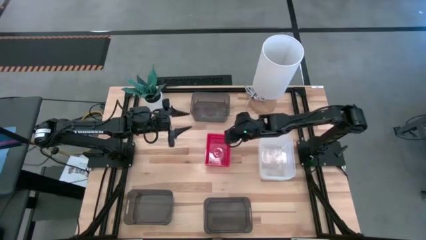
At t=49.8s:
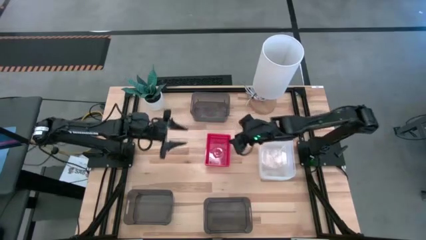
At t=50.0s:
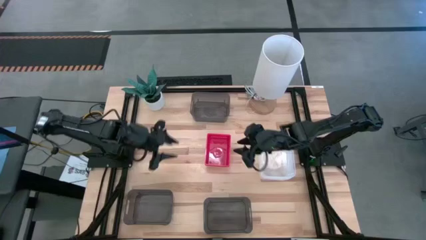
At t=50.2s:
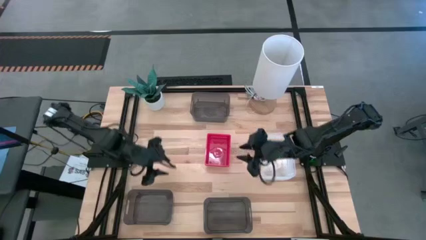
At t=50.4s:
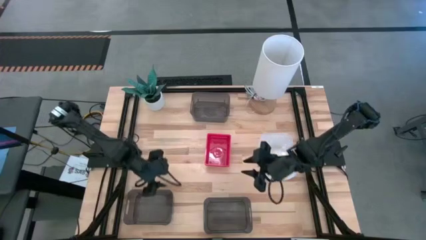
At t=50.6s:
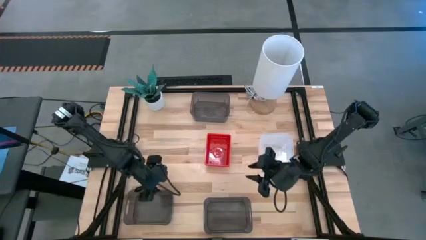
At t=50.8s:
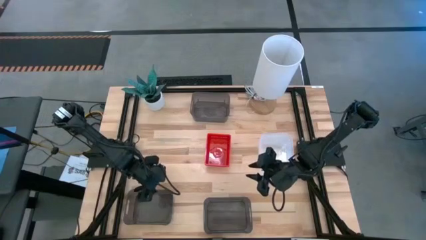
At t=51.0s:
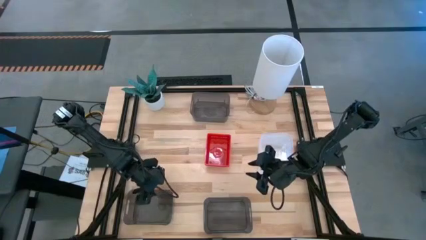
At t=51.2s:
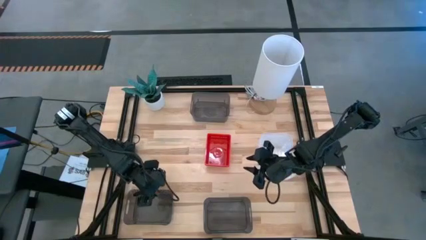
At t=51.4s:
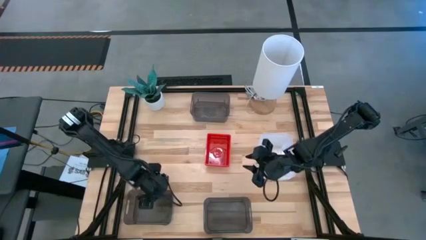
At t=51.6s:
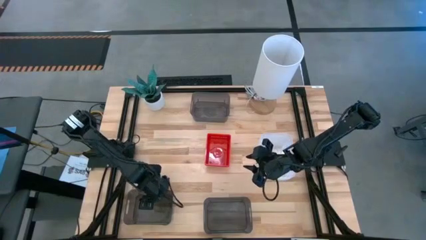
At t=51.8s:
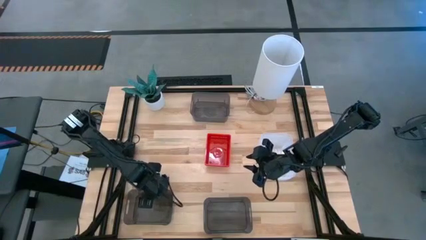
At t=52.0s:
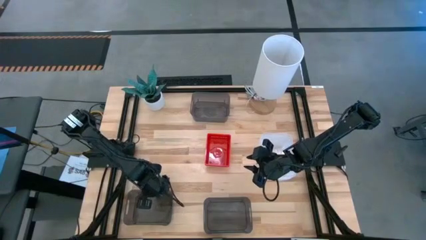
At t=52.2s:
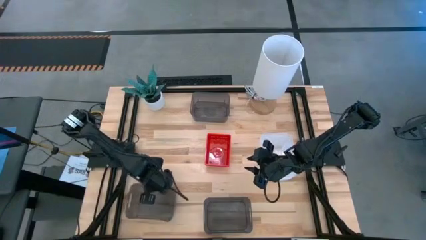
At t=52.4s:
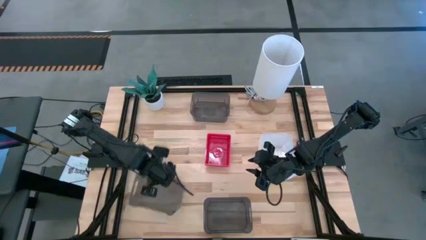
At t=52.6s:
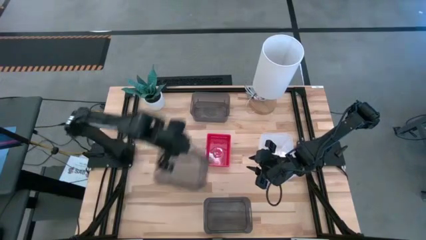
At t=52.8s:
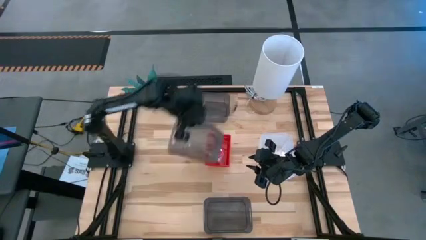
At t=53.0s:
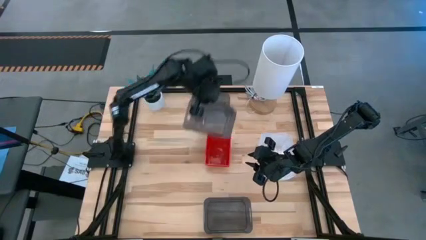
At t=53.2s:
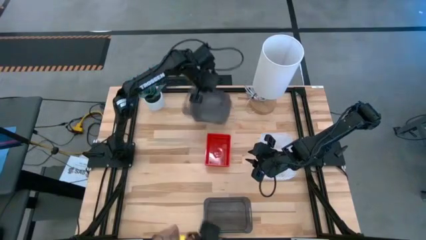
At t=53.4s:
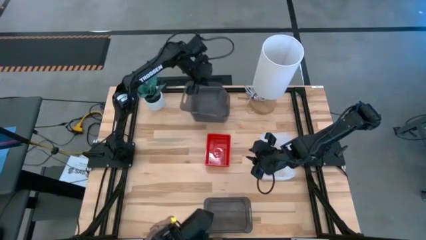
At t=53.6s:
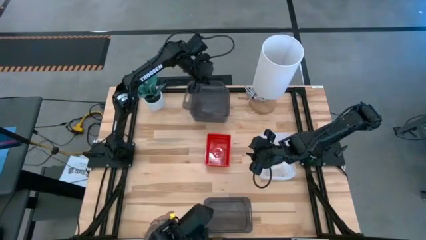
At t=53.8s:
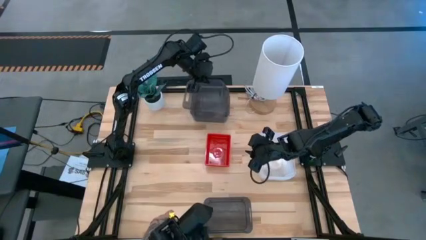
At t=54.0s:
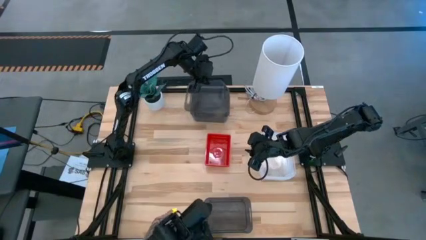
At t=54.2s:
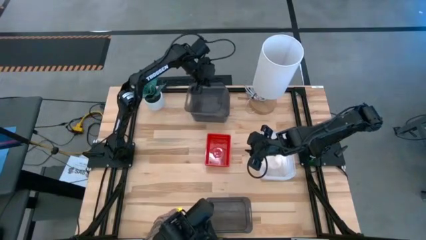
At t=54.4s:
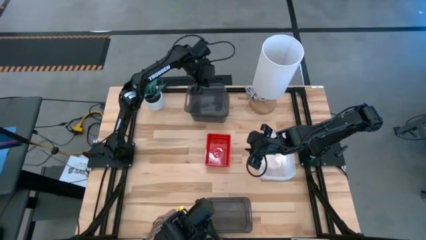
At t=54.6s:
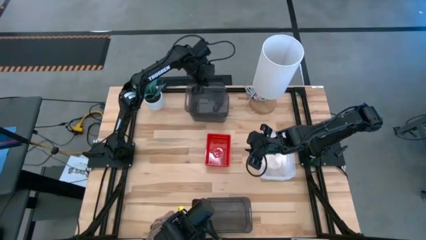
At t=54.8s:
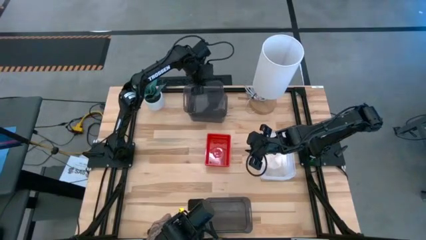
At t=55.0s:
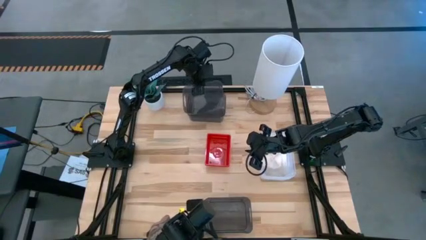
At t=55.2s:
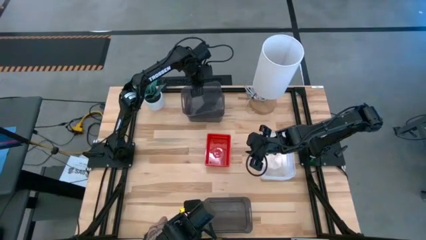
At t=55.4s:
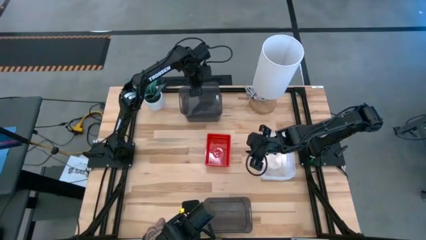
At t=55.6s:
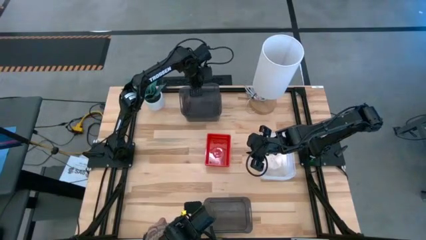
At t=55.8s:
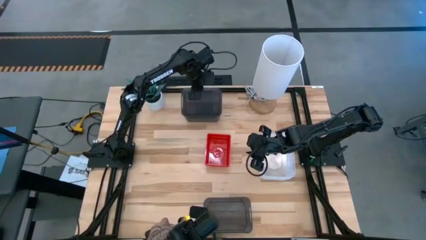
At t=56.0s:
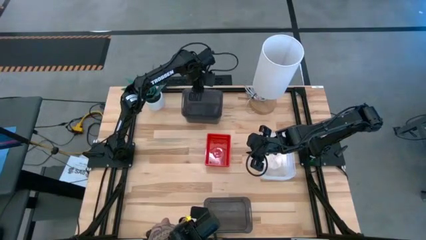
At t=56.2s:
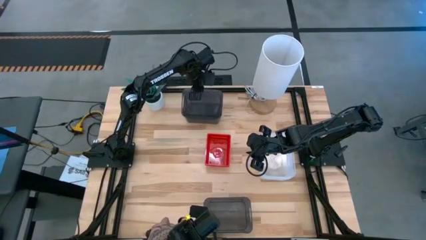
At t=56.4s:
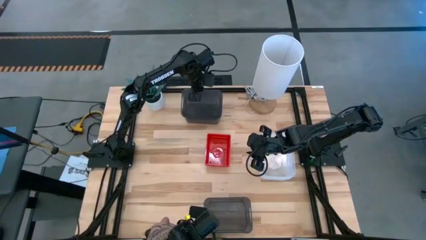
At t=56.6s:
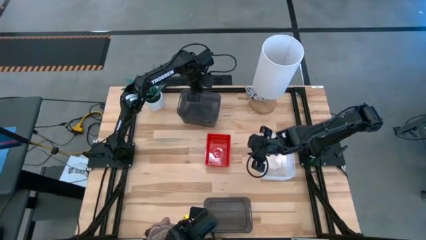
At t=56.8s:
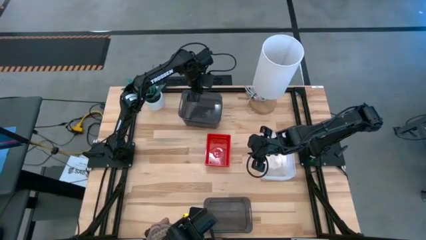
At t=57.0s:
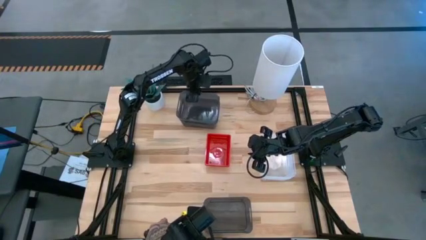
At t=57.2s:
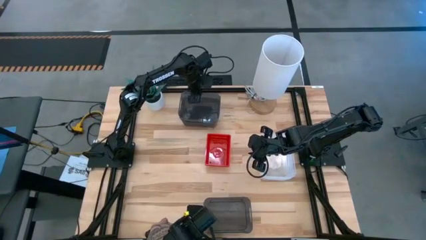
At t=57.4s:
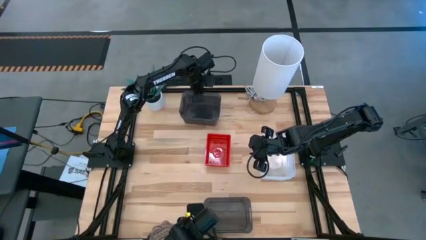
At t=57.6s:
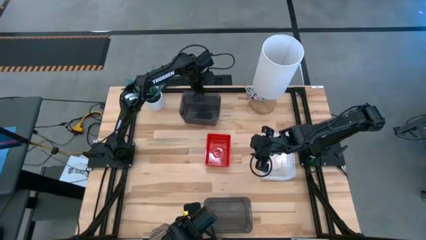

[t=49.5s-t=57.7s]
Stack the bottom left black bin on top of the top black bin

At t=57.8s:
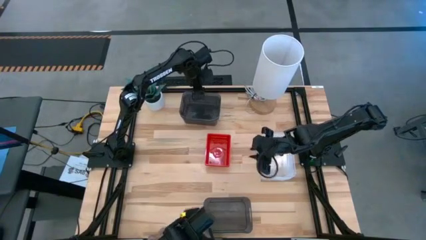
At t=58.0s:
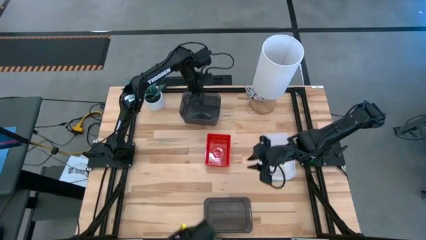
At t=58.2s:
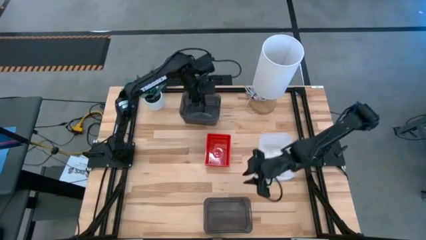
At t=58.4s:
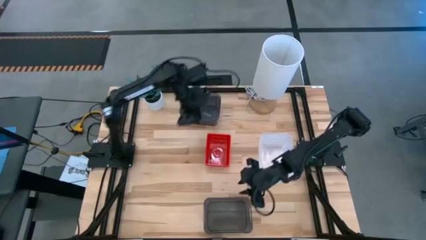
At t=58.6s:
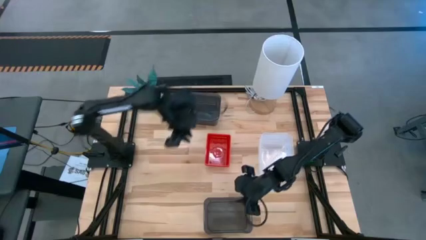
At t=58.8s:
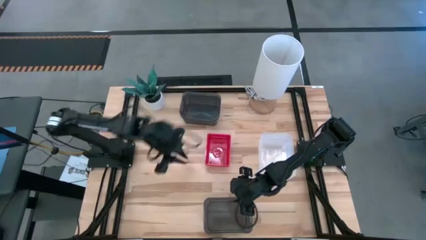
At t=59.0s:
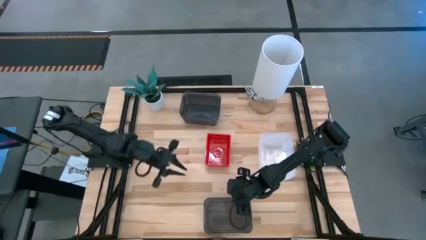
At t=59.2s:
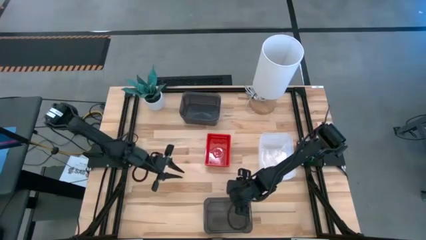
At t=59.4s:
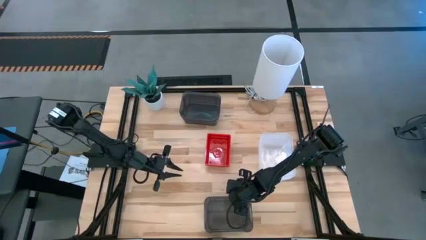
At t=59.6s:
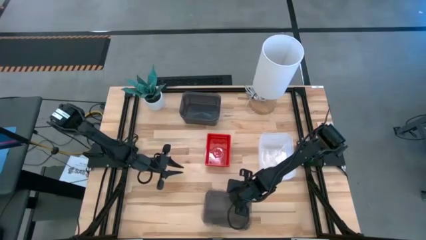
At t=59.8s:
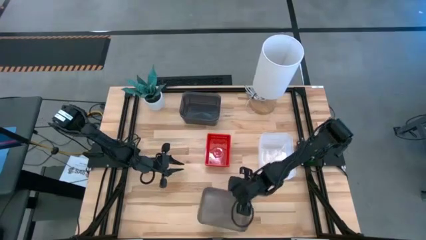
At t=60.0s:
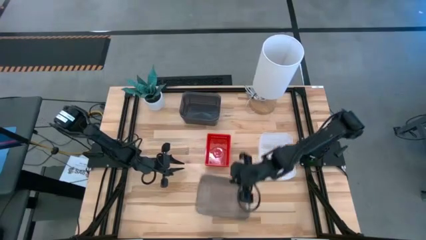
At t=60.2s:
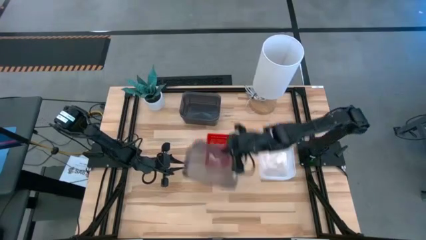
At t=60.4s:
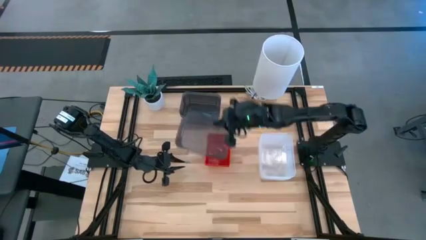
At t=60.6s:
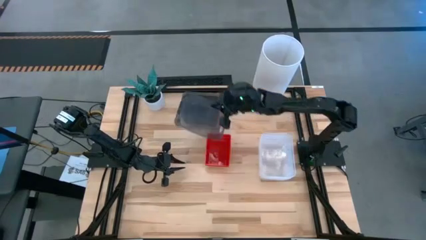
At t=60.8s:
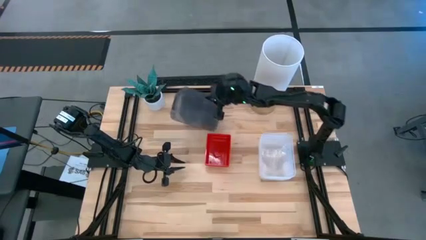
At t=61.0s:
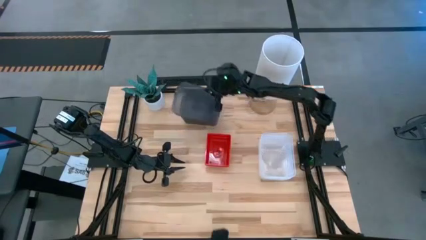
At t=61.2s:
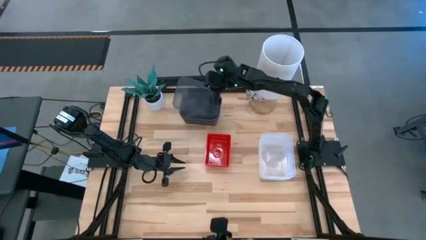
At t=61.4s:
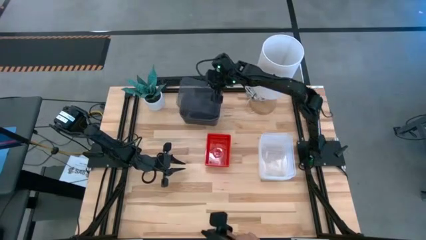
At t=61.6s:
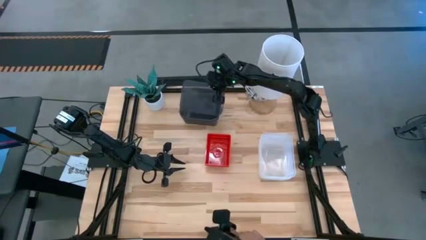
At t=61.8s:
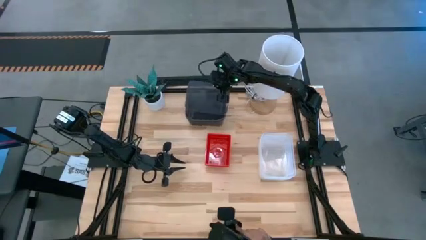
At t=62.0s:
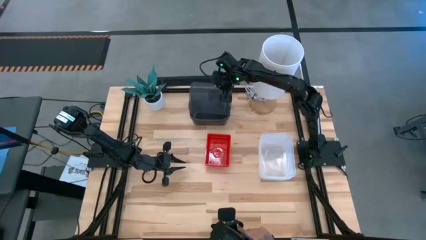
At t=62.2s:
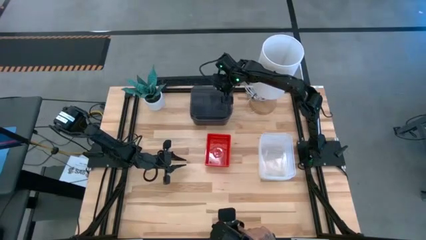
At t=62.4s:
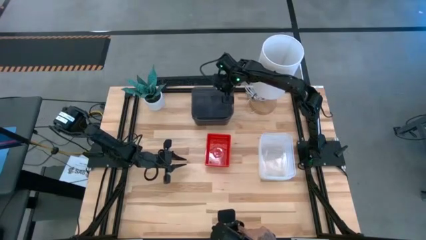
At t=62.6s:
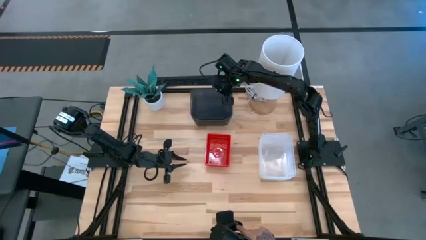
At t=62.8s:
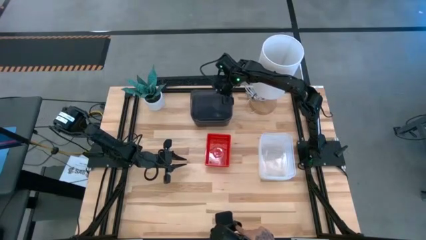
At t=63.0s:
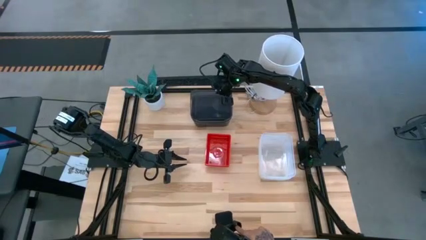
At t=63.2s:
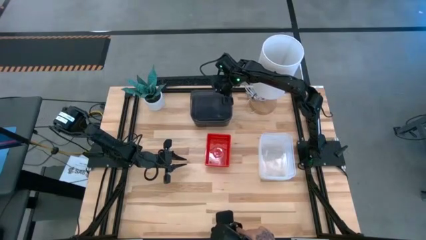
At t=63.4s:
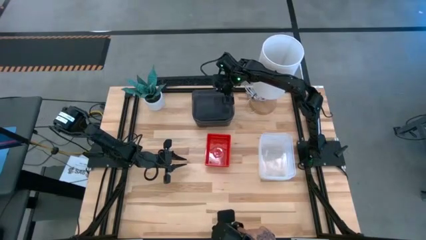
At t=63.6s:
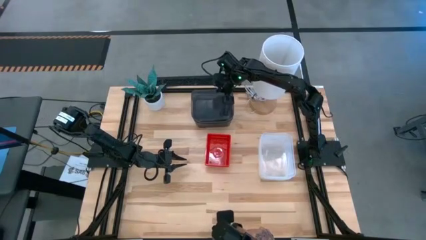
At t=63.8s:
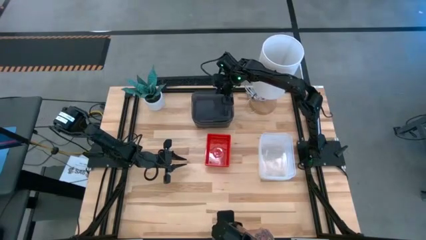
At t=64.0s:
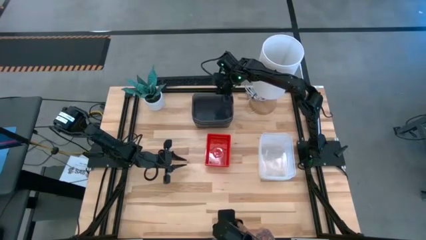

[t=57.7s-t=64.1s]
Stack the bottom black bin on top of the top black bin
